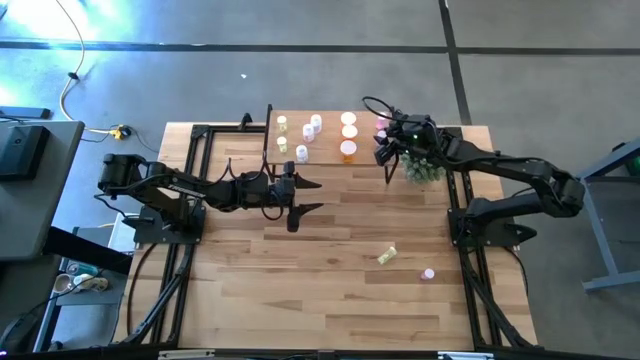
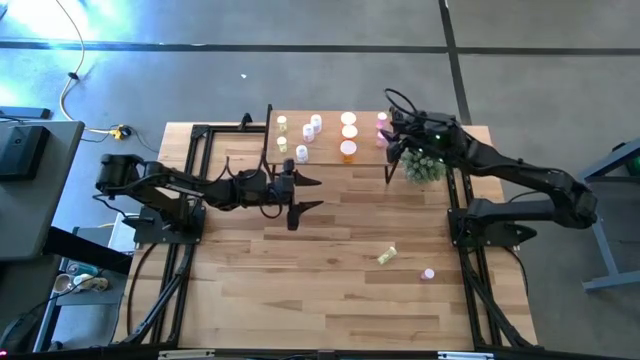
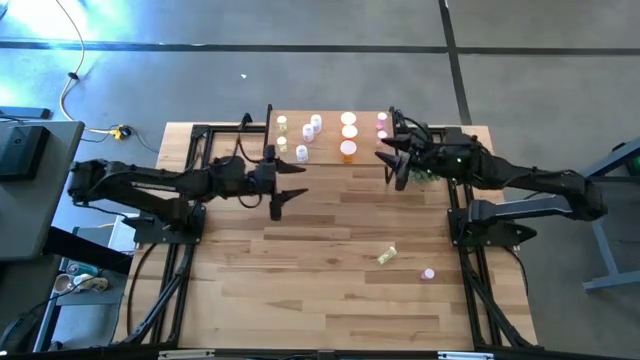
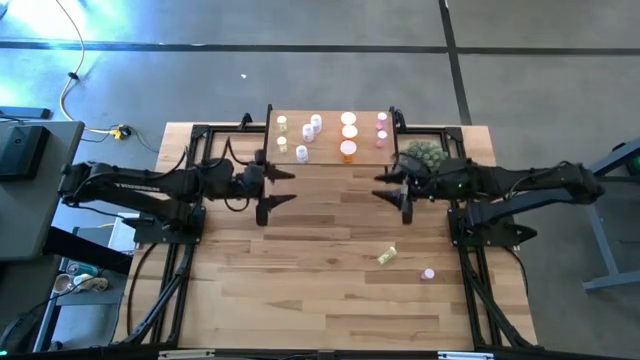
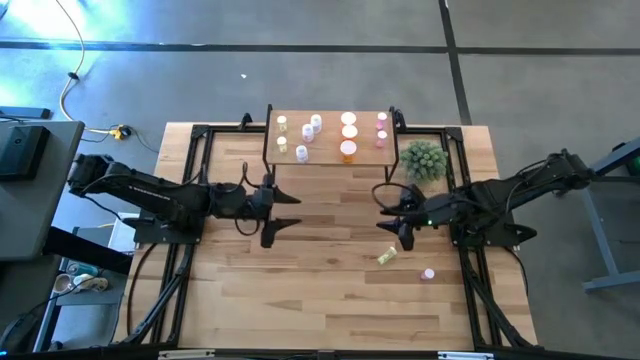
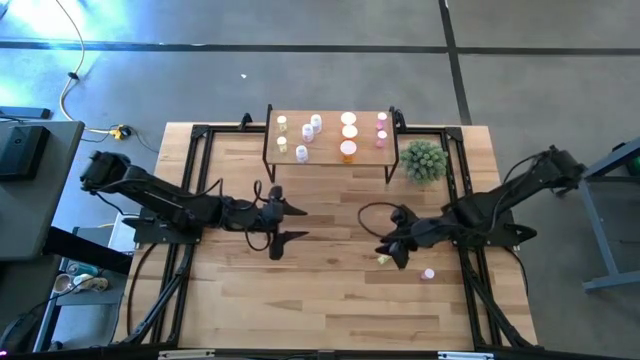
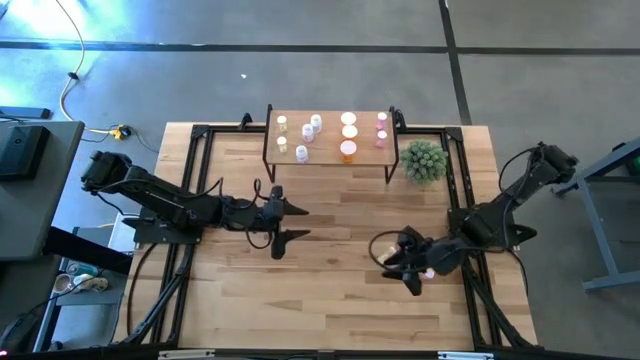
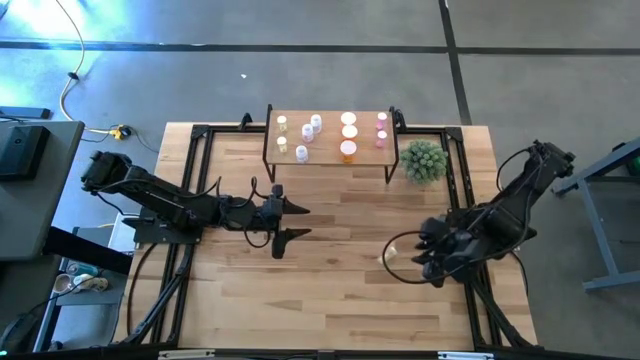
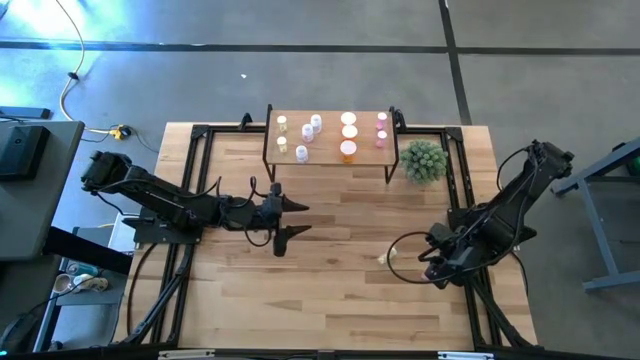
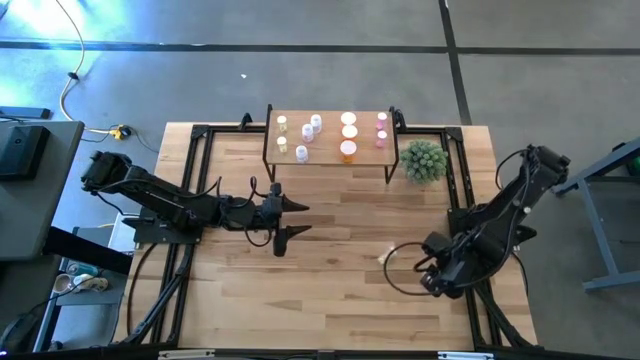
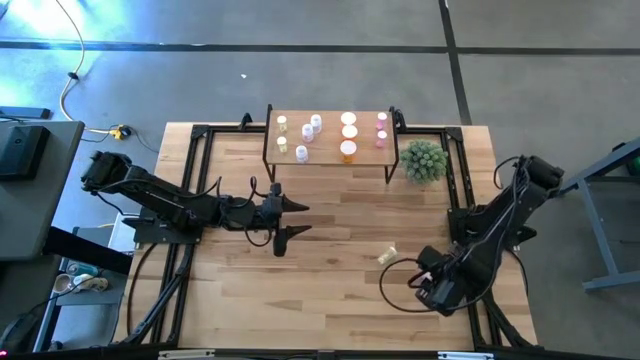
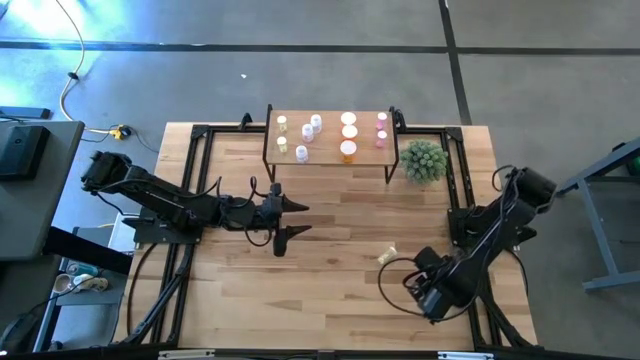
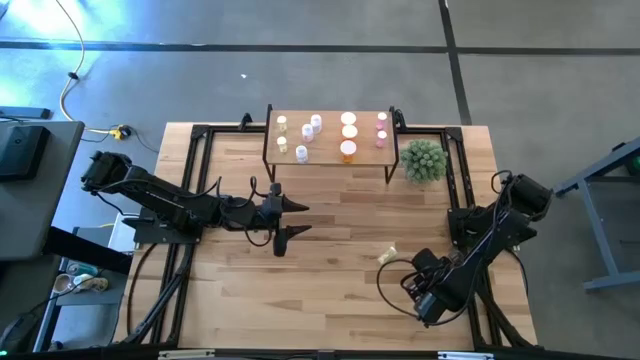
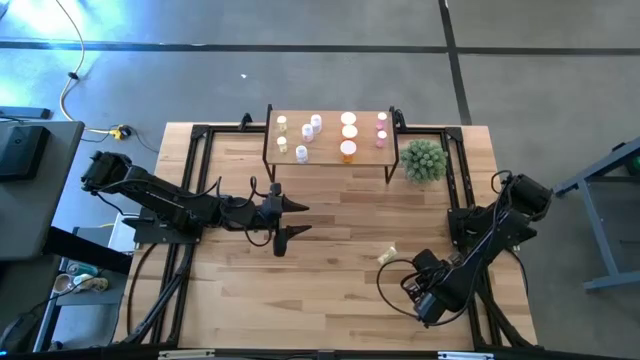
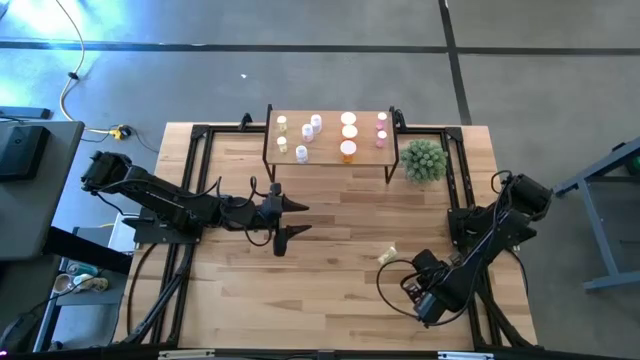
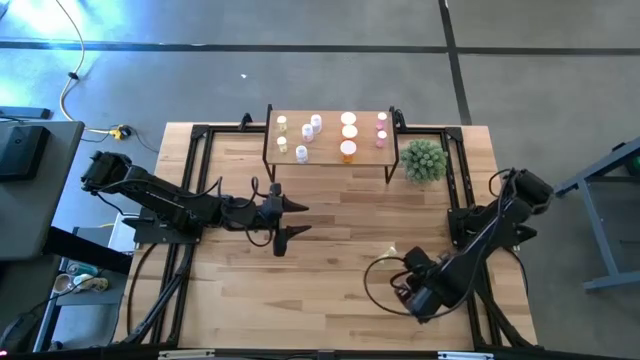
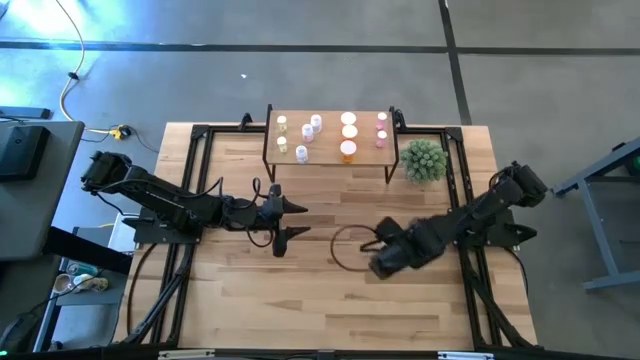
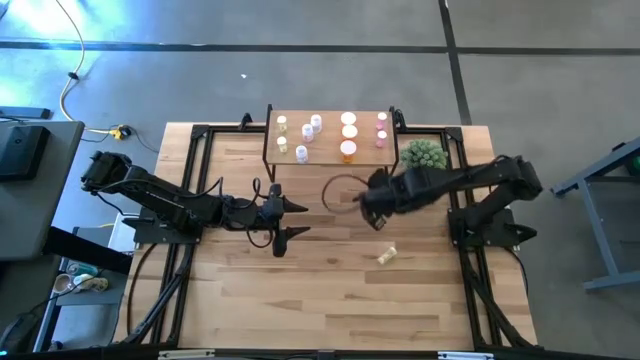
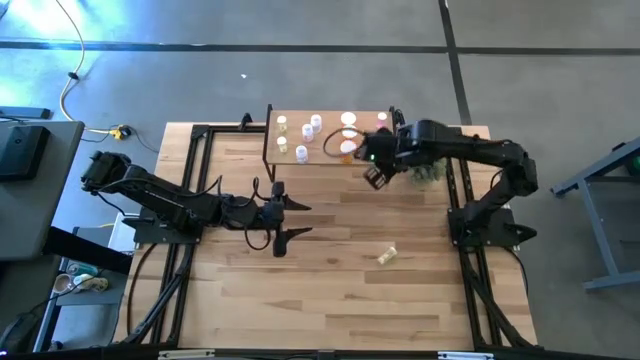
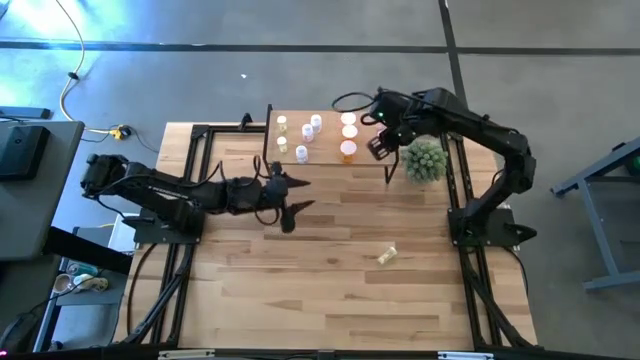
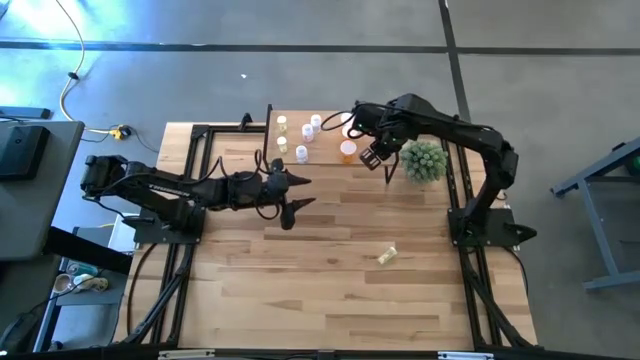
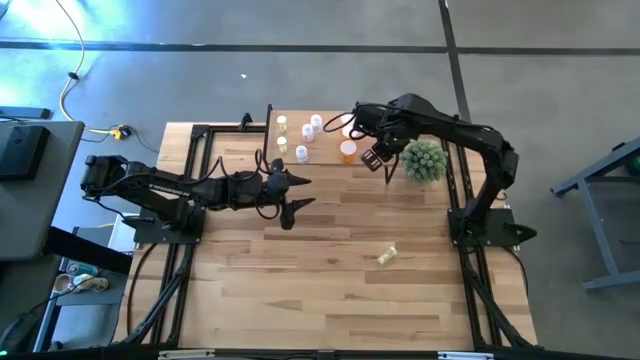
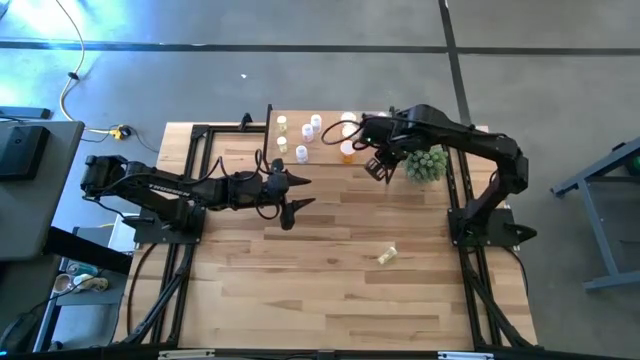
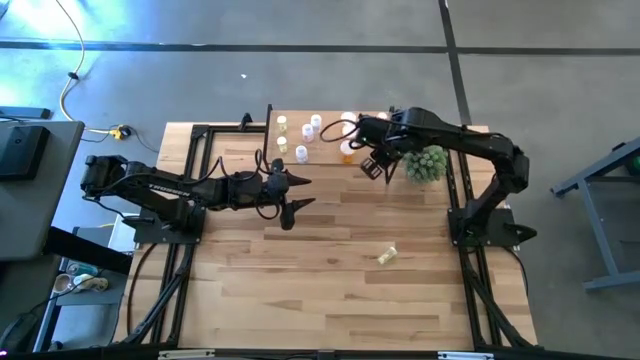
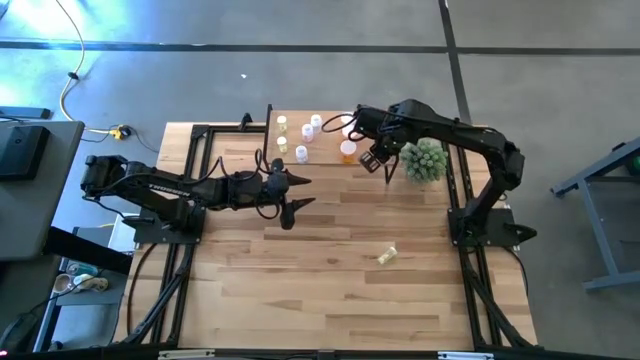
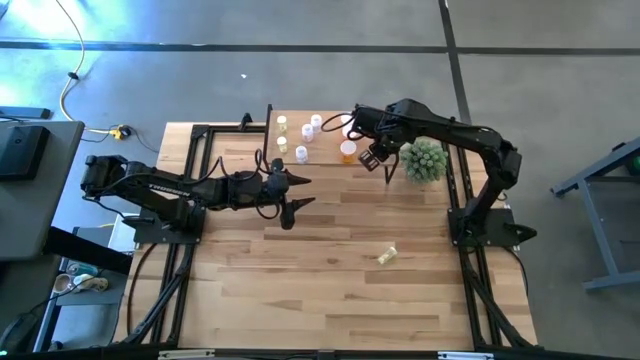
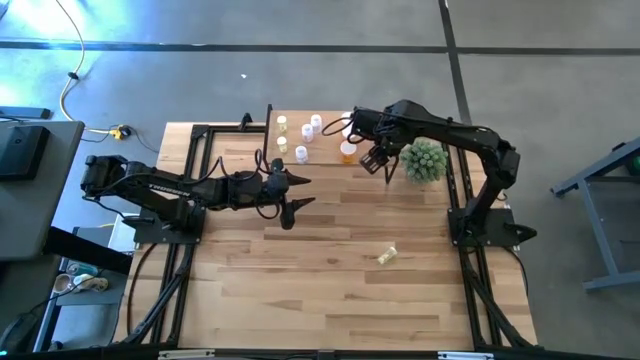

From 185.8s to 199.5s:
Task: Pick and place medicine bottles onto shelf by color
Put the pink pill bottle aligned with the other pink bottle on the shelf

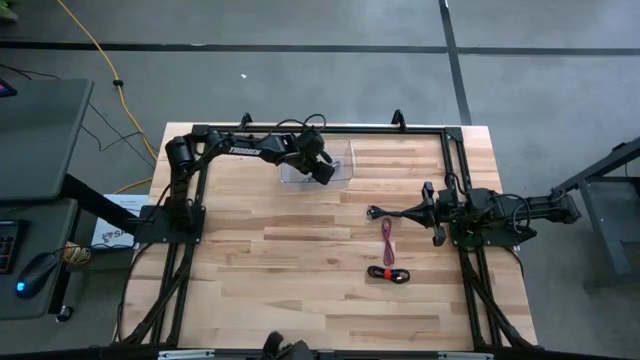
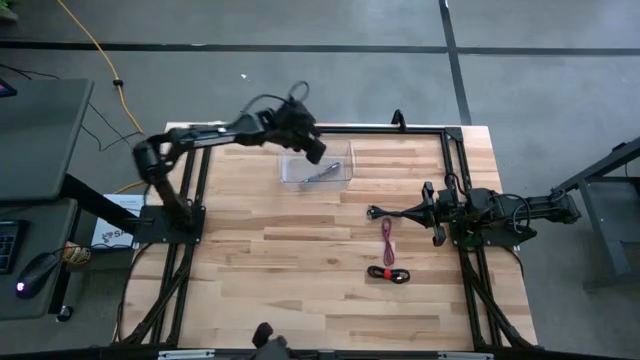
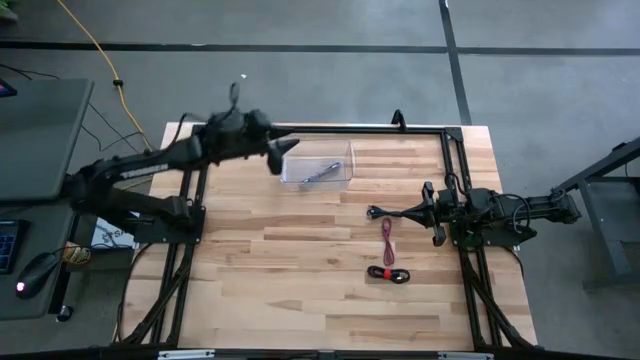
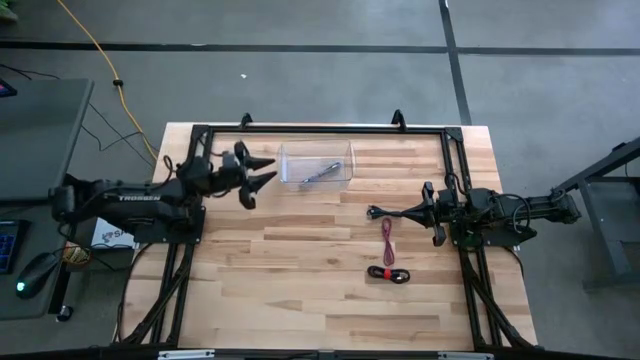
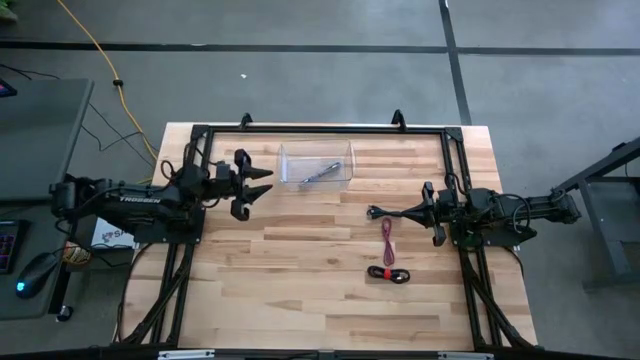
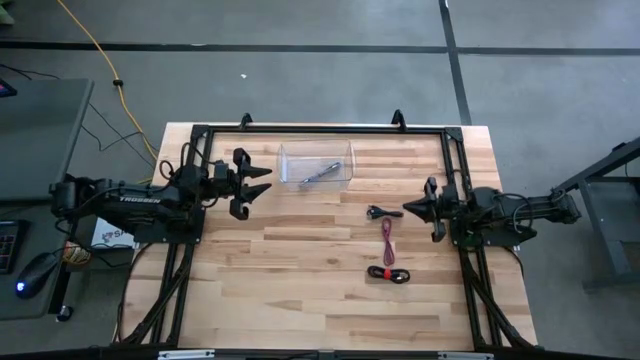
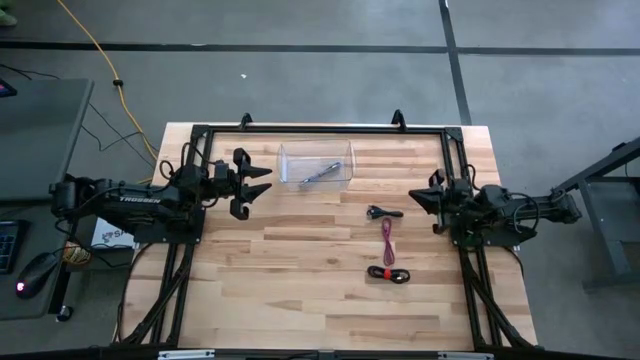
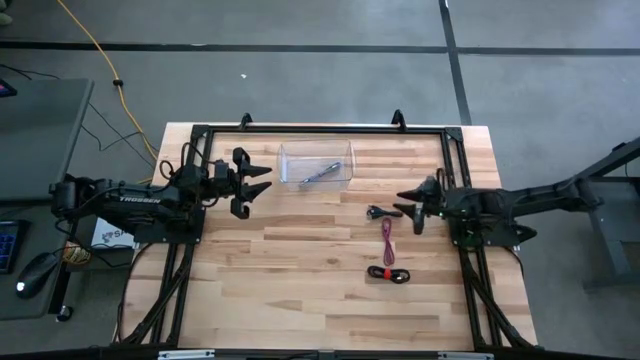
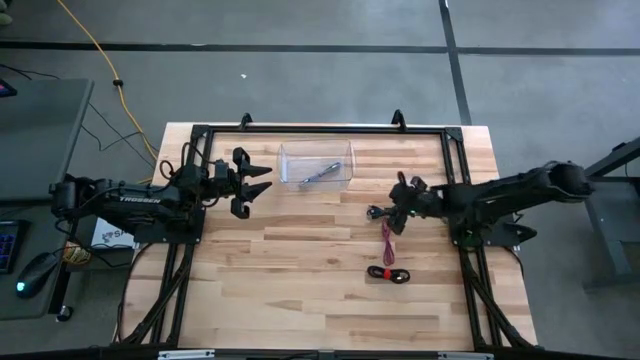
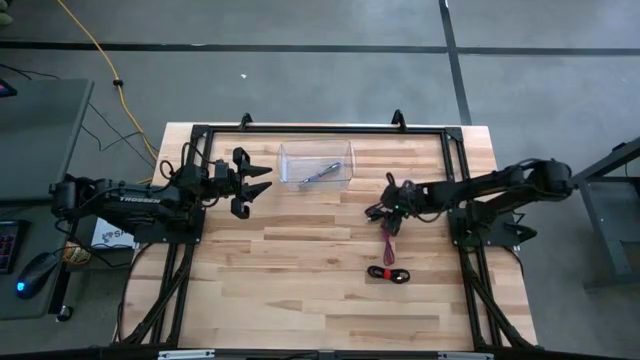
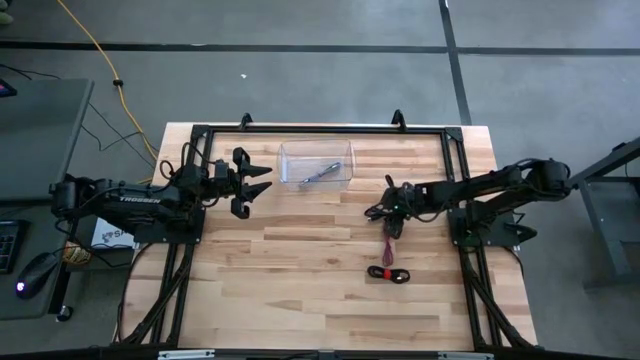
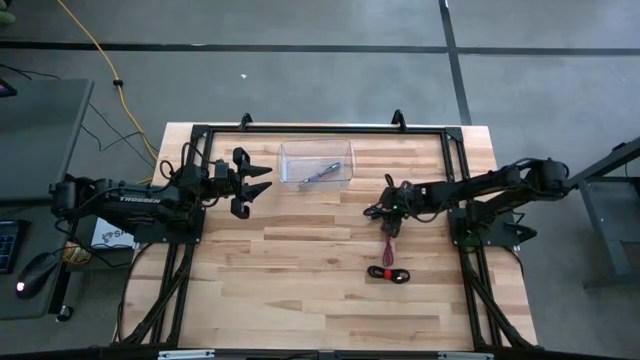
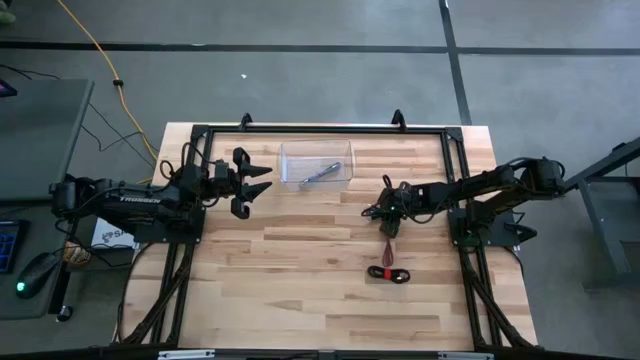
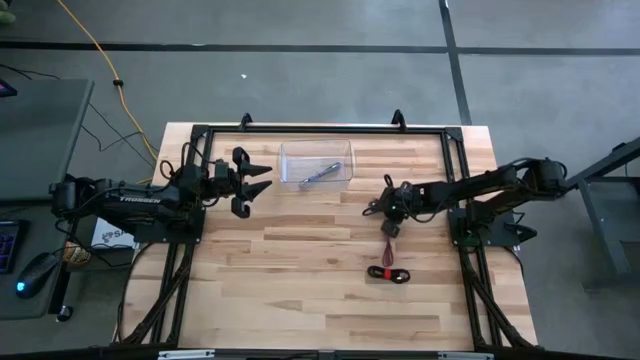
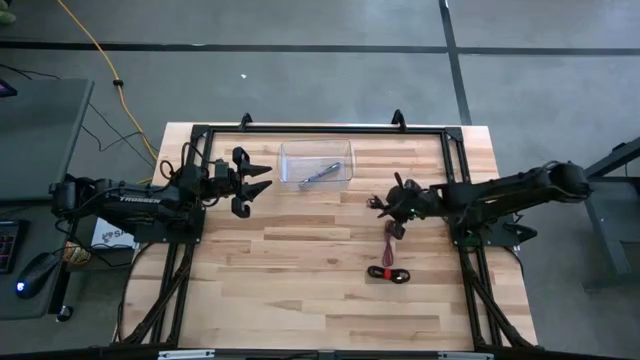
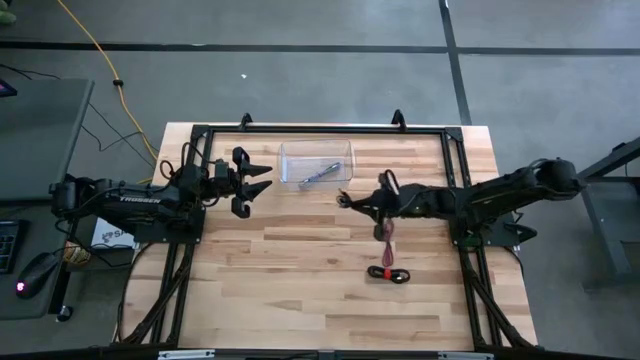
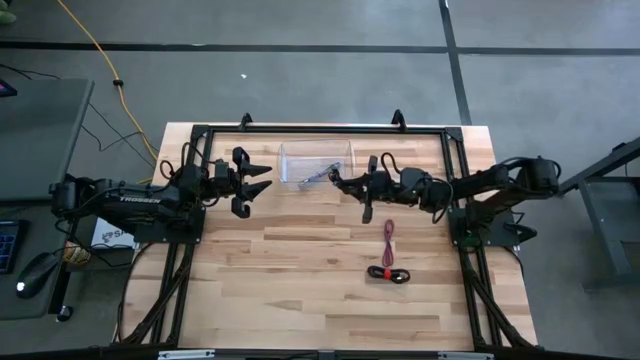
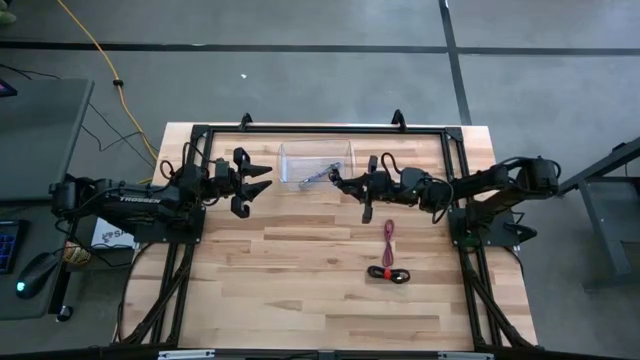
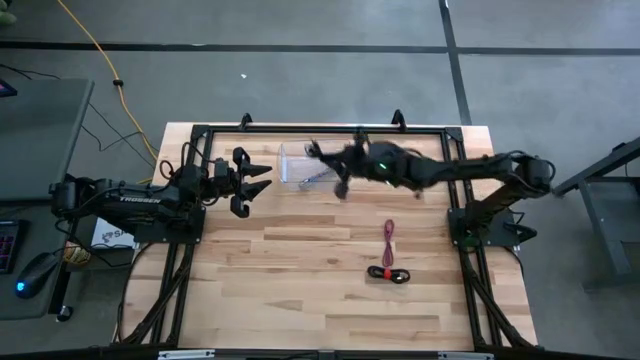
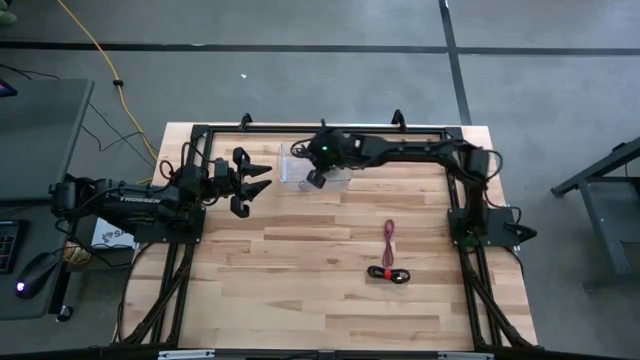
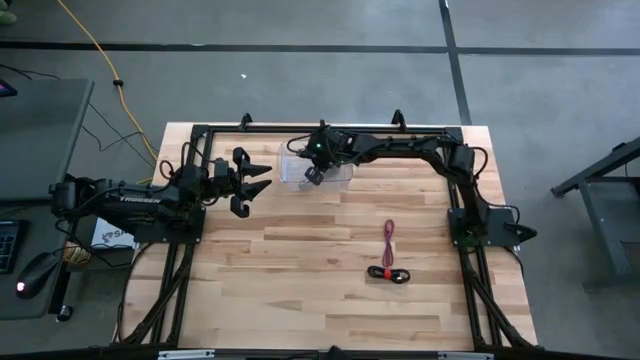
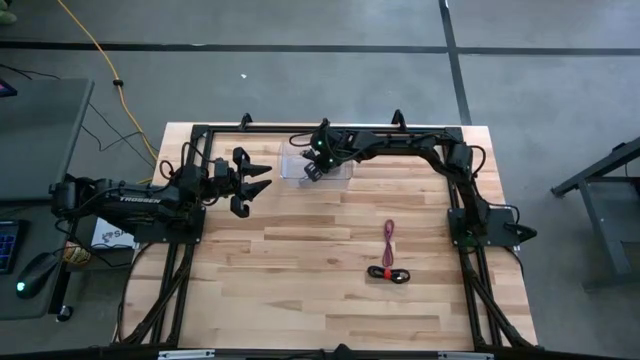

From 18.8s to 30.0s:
Task: Pick and place USB-C Cables
Put the top black charger cable into the transparent bin
